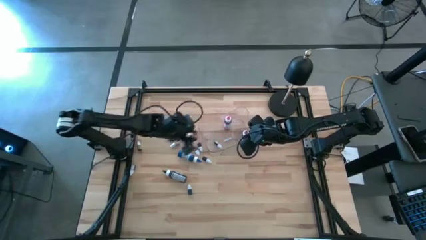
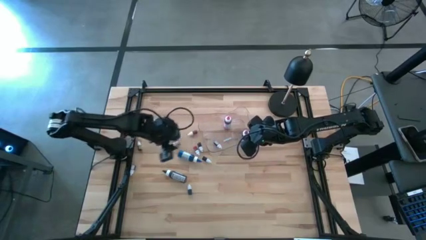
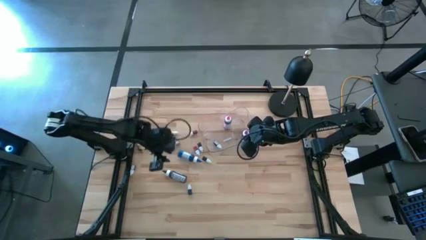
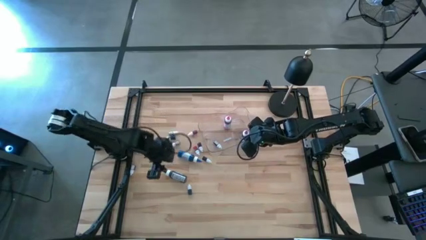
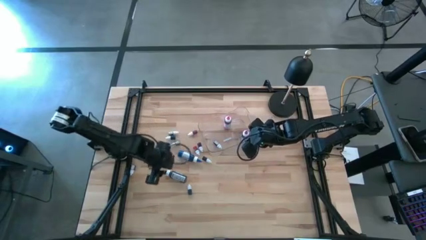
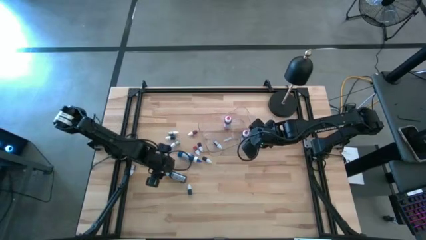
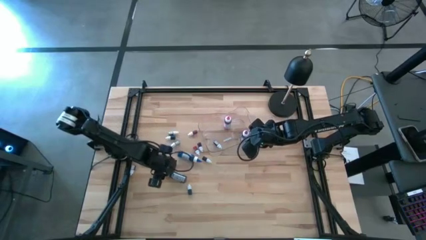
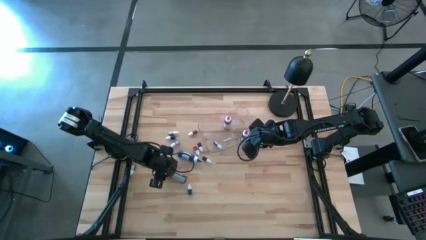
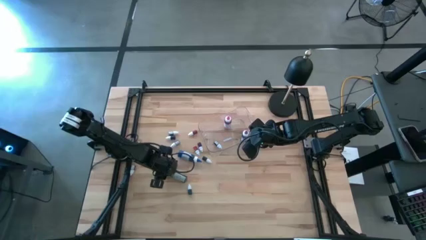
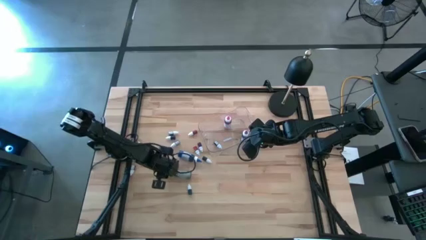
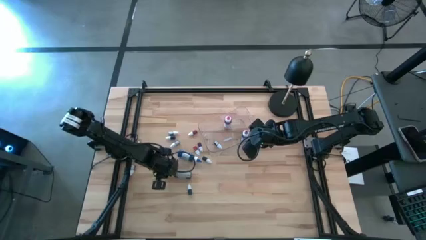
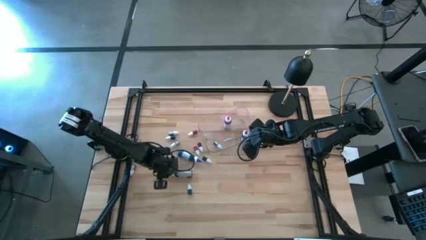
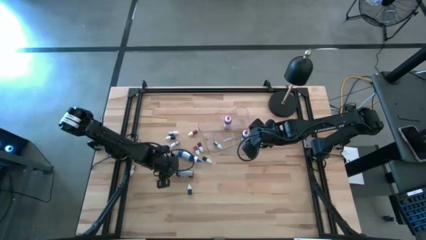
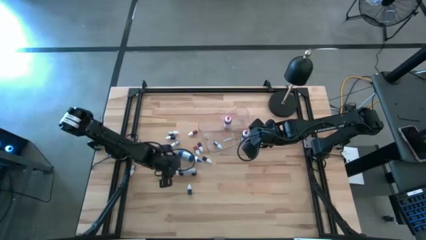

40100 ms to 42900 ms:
Task: Pick & Place food coloring
Put the large black food coloring bottle into the transparent container

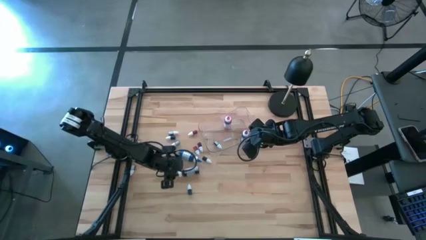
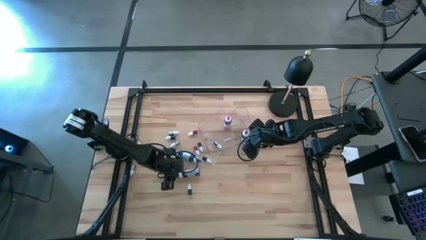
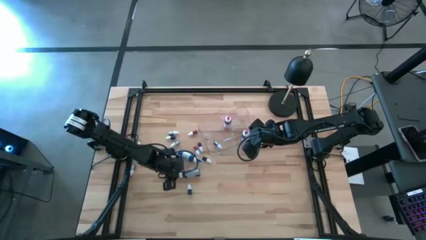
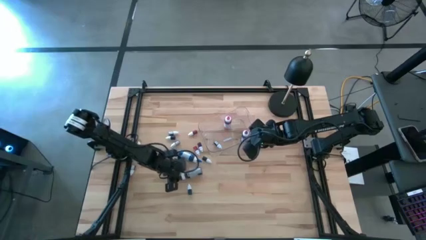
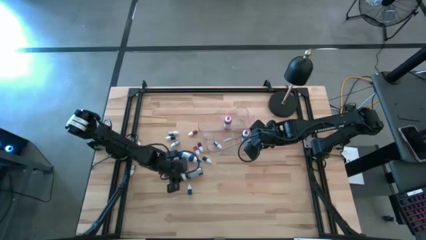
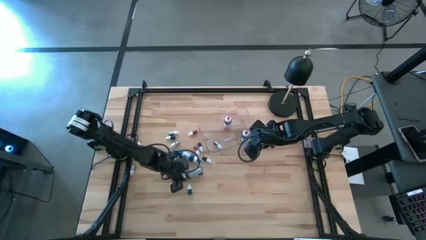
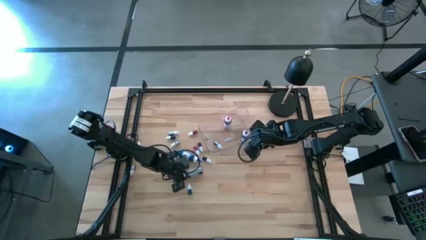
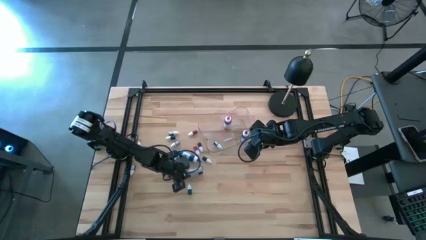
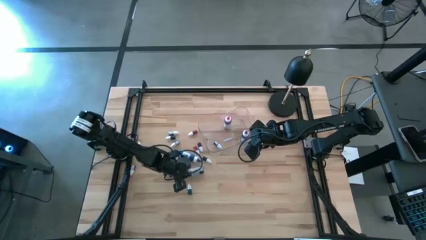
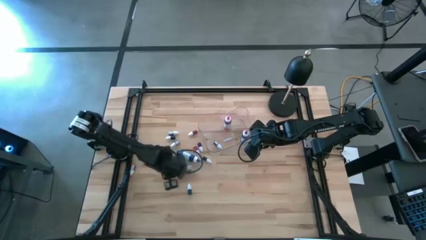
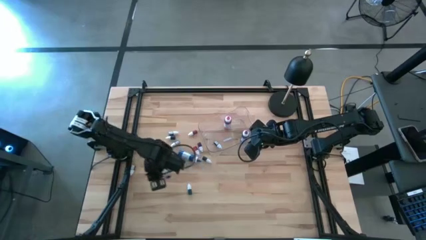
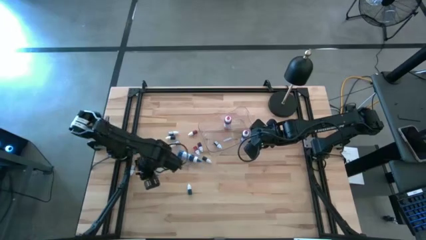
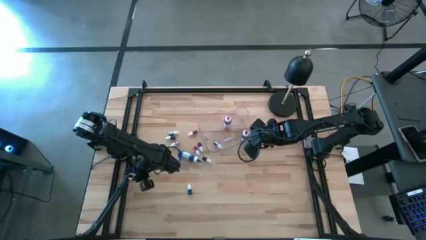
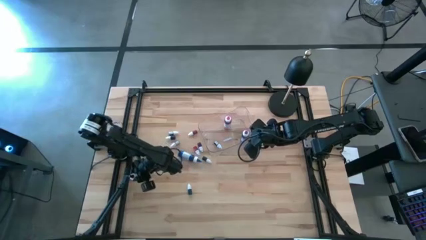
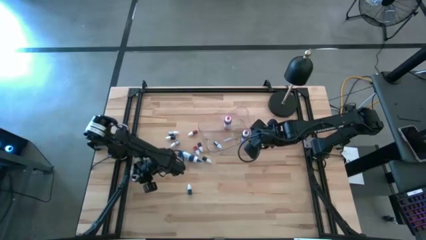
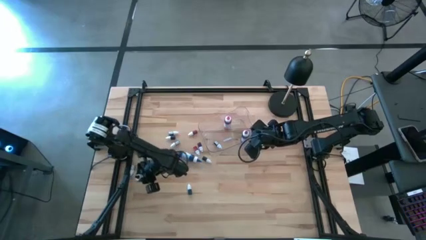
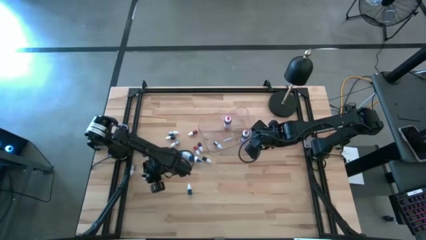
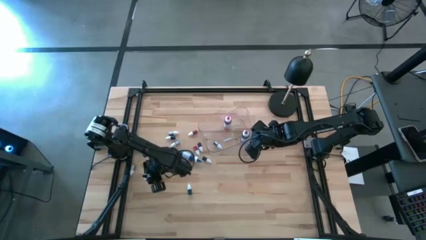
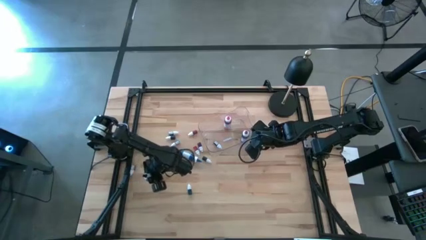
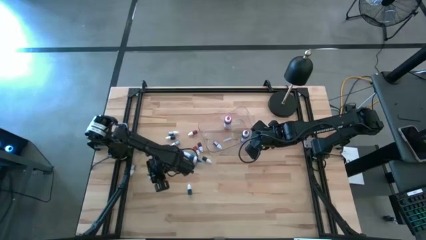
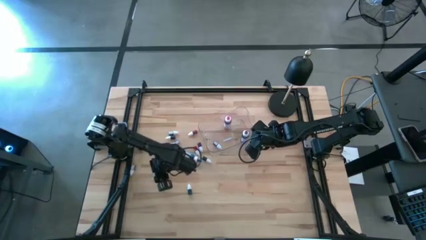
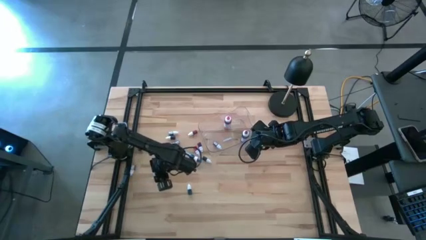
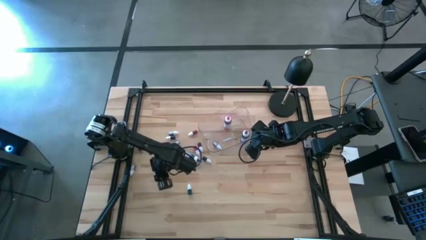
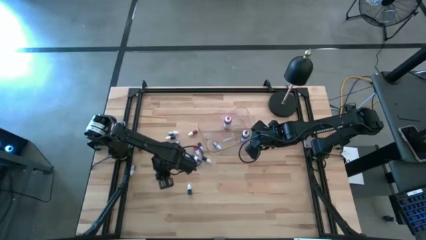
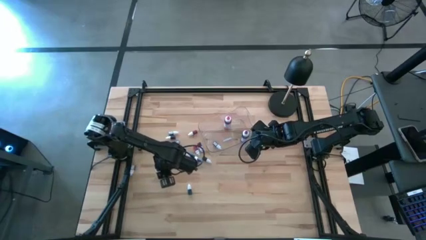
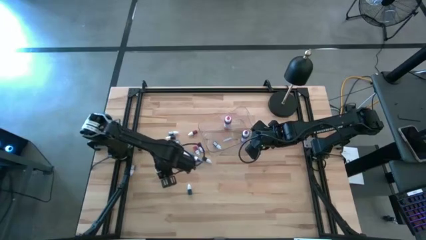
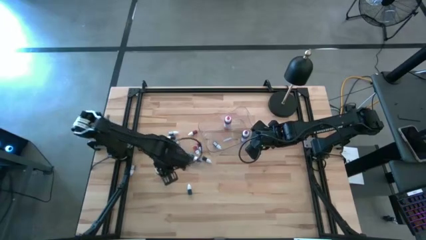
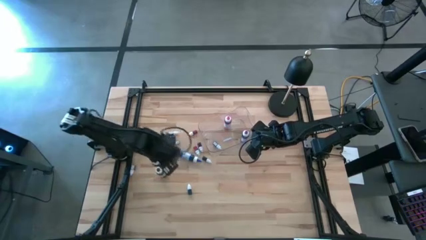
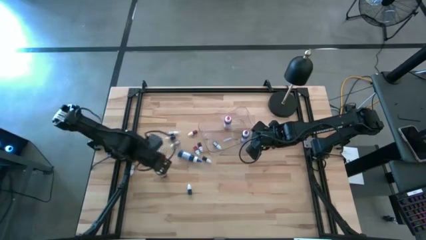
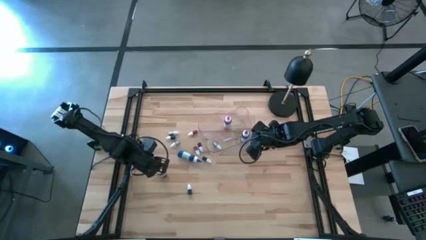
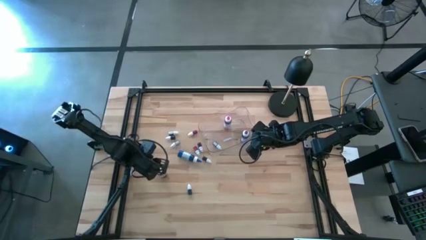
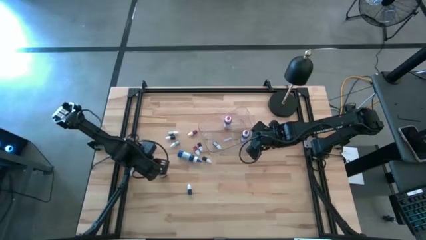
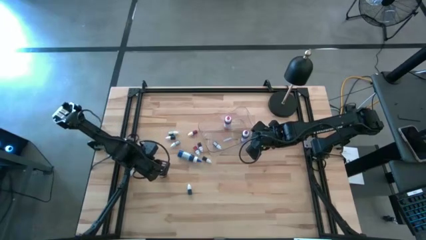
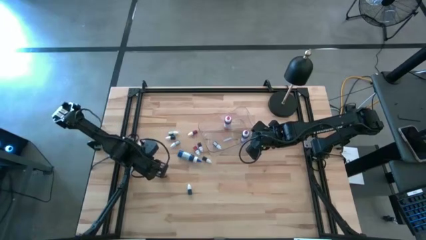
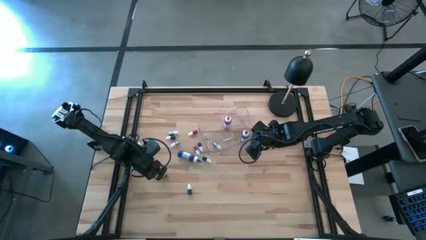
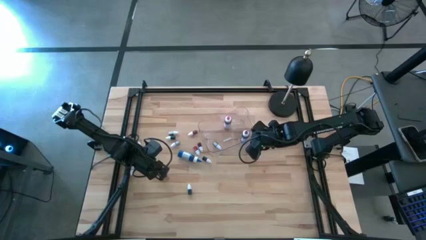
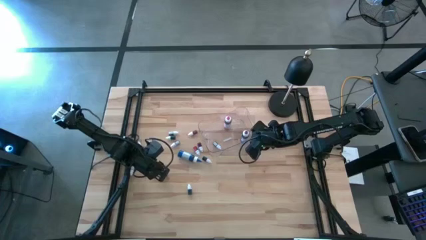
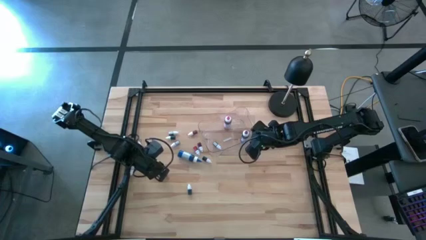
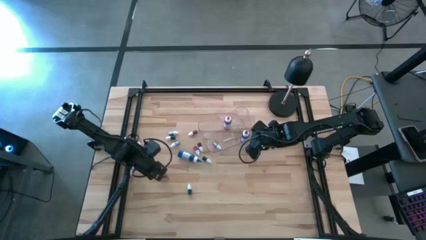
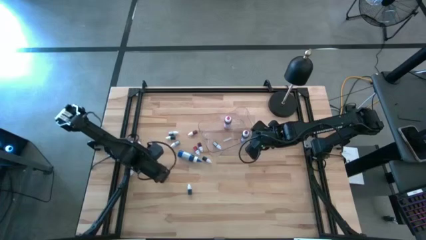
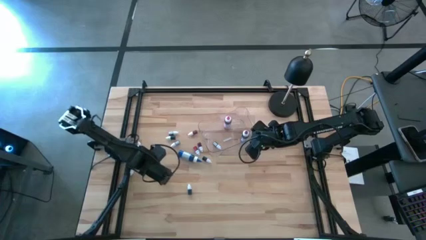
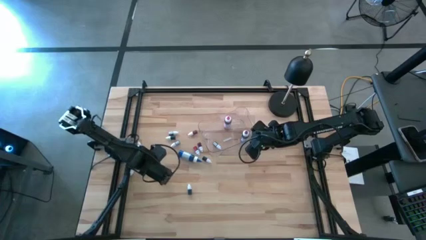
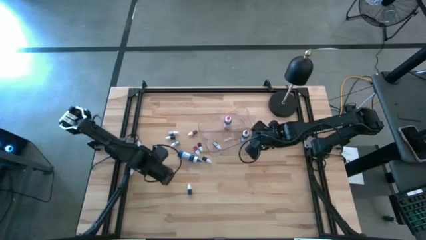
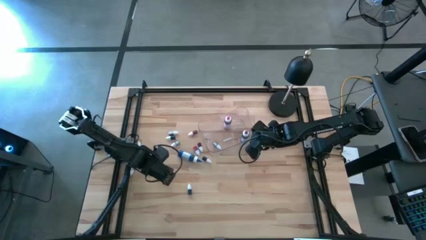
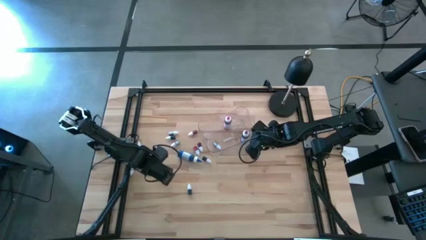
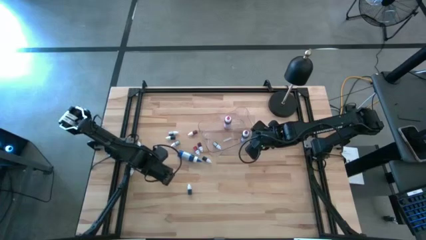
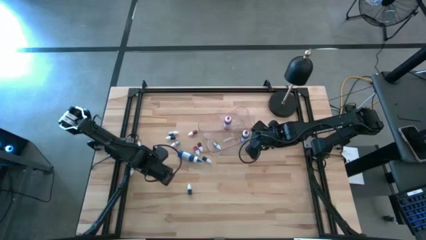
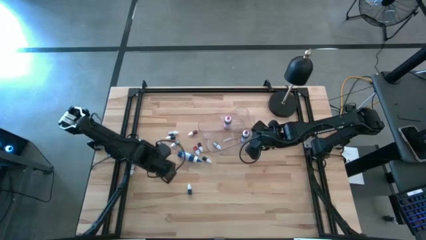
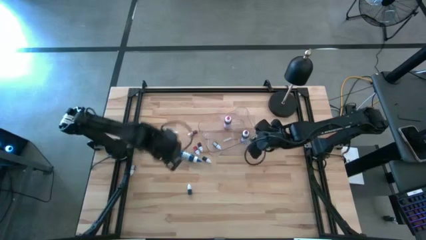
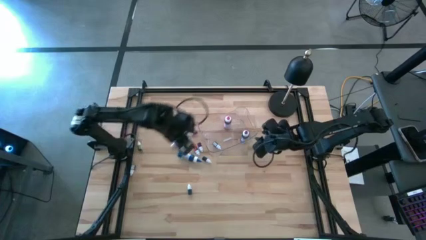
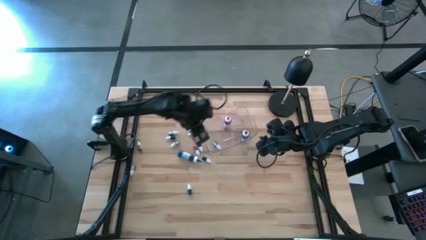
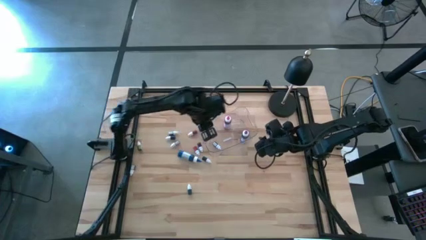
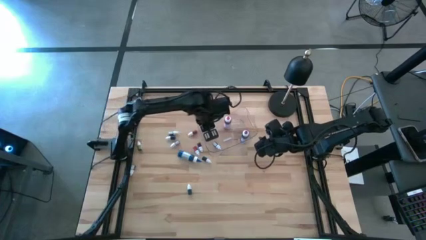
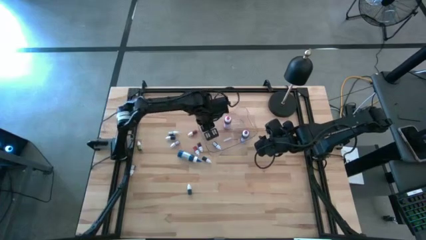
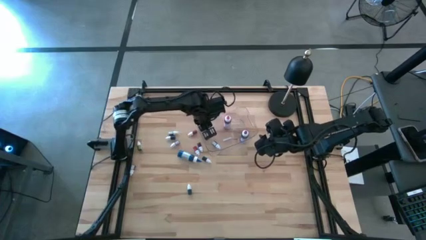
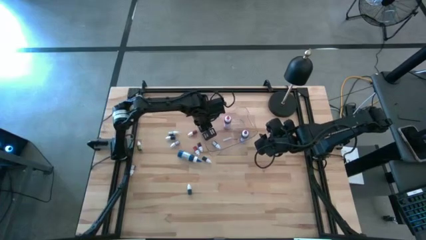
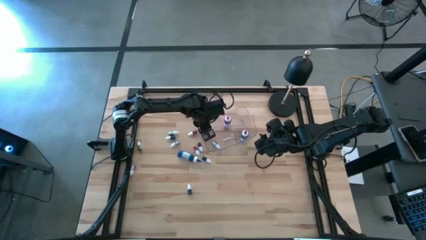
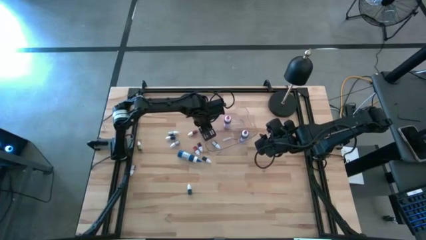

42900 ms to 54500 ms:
Put the large black food coloring bottle into the transparent container
